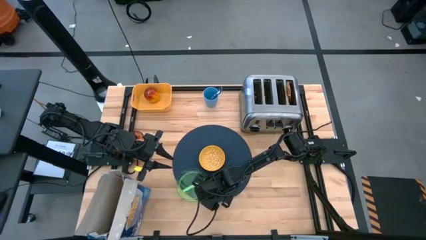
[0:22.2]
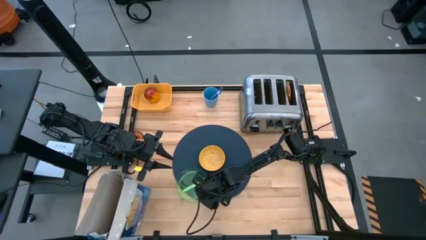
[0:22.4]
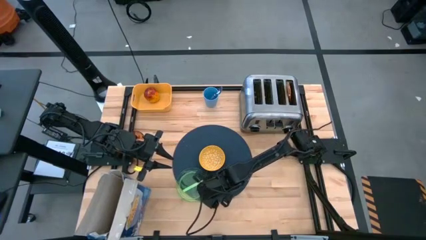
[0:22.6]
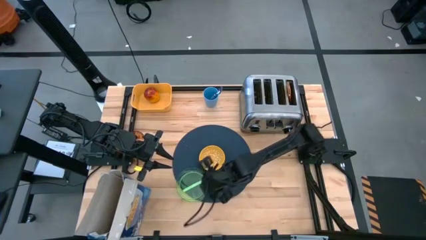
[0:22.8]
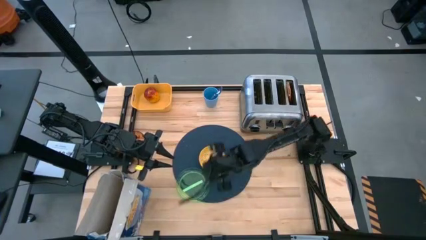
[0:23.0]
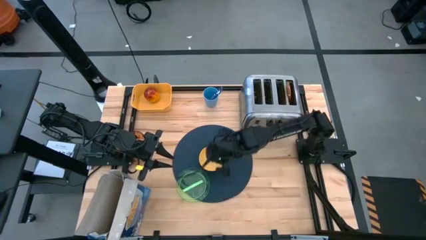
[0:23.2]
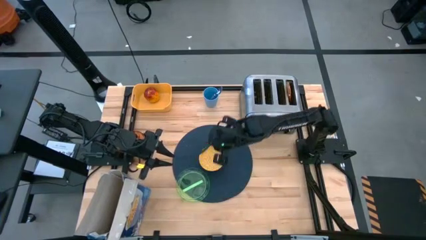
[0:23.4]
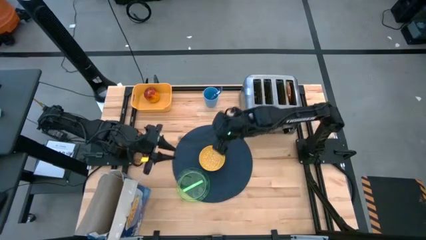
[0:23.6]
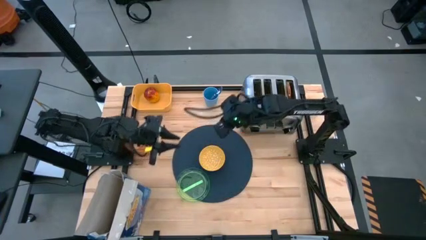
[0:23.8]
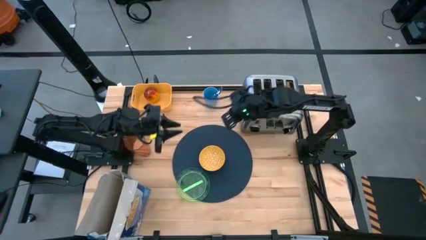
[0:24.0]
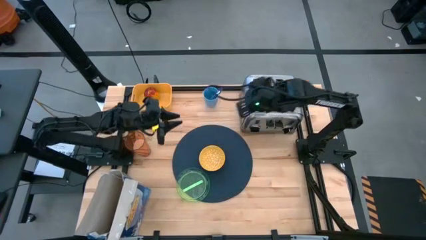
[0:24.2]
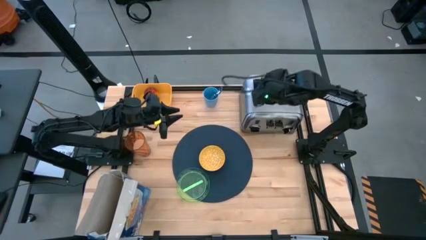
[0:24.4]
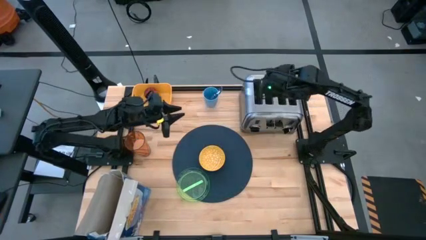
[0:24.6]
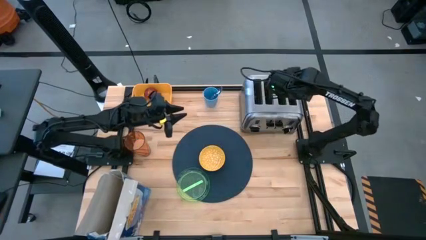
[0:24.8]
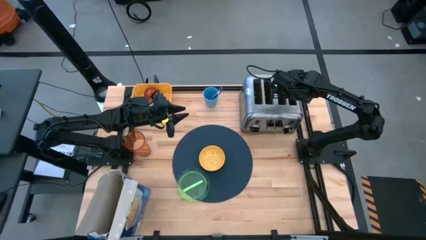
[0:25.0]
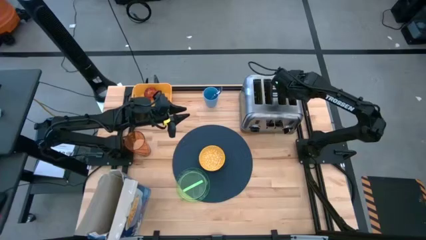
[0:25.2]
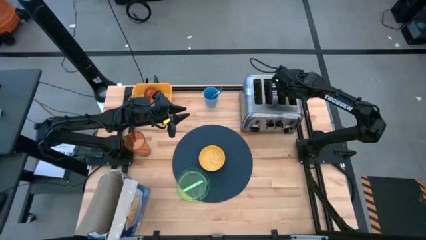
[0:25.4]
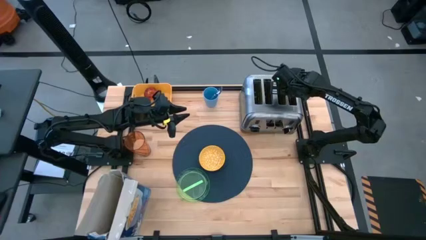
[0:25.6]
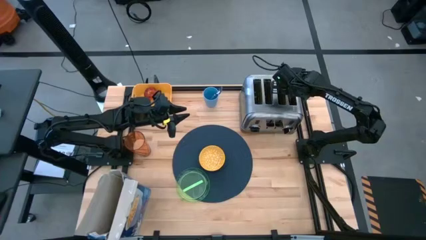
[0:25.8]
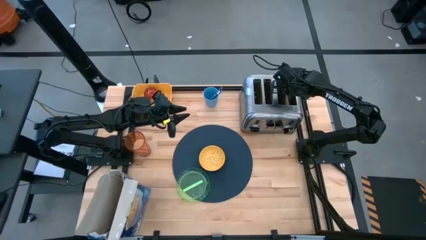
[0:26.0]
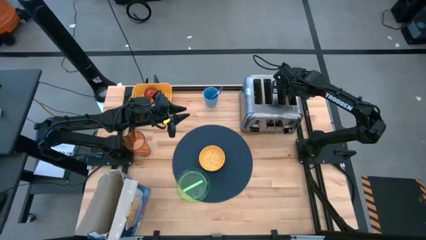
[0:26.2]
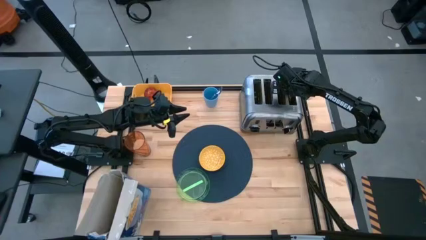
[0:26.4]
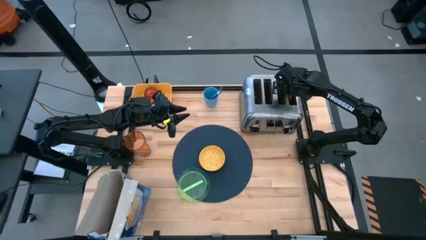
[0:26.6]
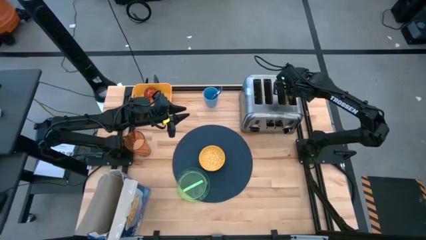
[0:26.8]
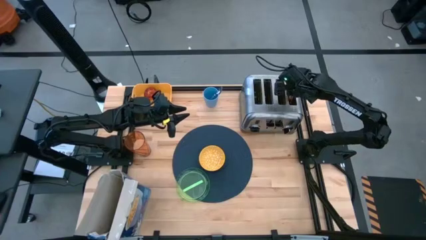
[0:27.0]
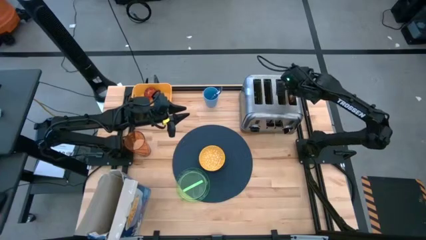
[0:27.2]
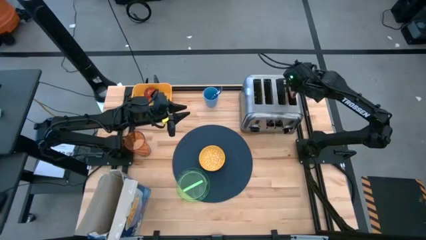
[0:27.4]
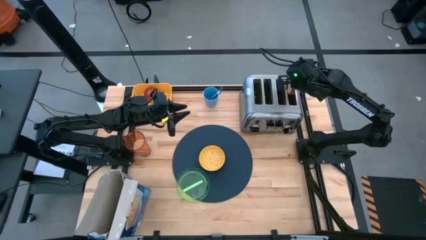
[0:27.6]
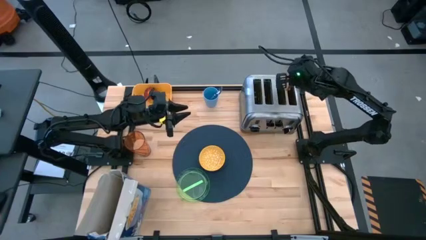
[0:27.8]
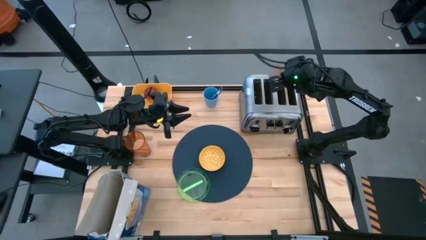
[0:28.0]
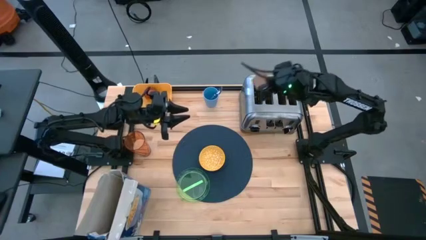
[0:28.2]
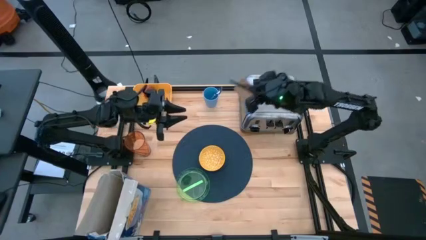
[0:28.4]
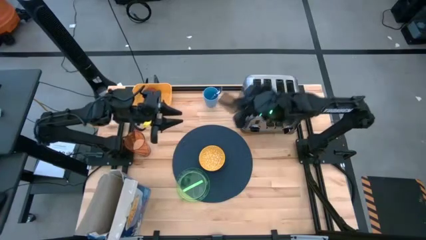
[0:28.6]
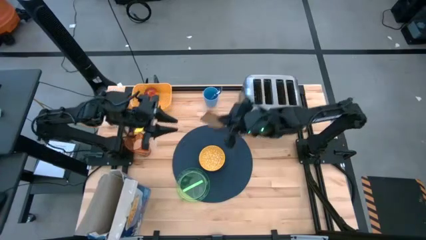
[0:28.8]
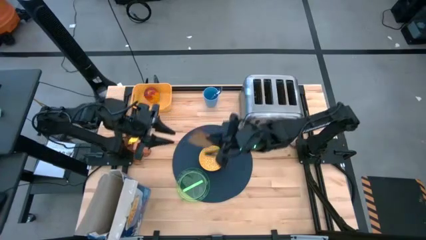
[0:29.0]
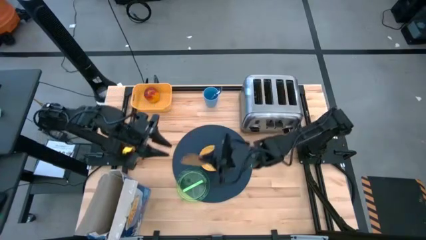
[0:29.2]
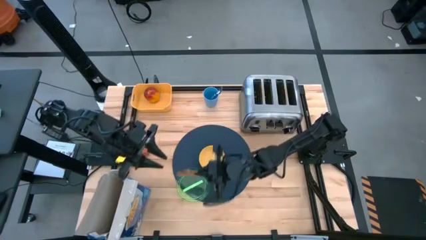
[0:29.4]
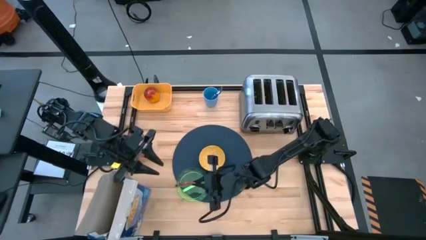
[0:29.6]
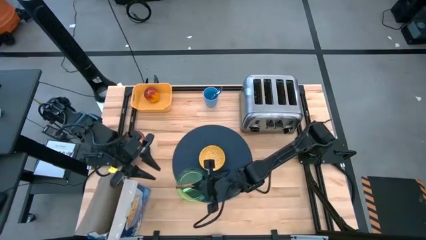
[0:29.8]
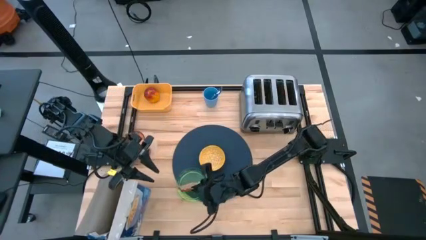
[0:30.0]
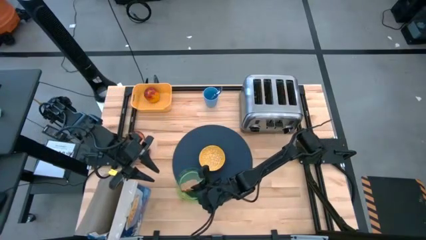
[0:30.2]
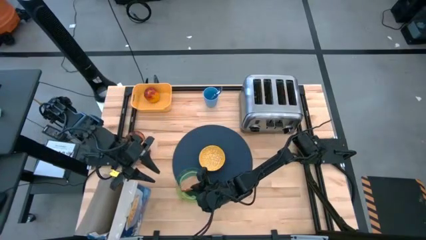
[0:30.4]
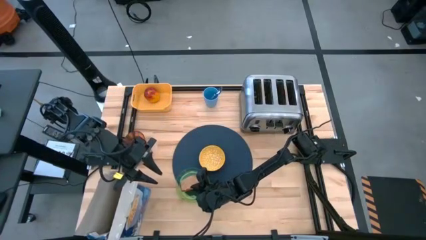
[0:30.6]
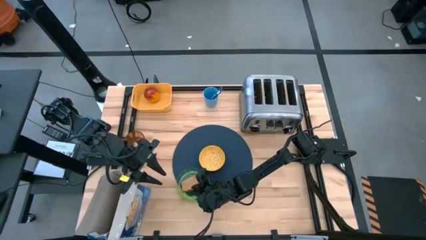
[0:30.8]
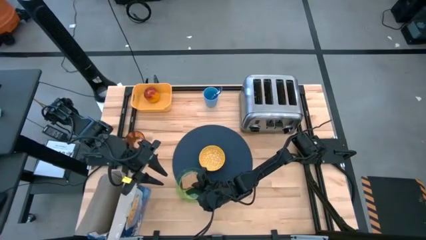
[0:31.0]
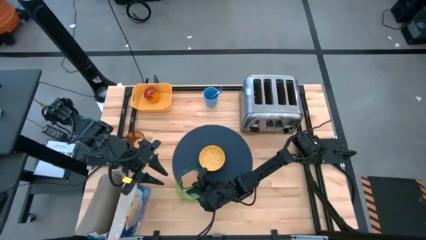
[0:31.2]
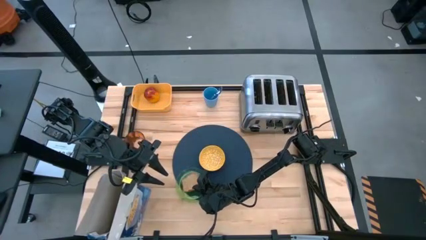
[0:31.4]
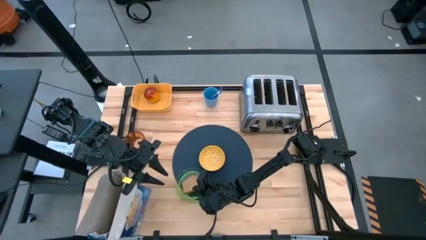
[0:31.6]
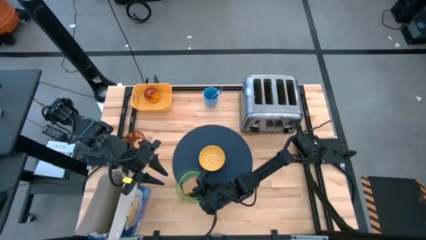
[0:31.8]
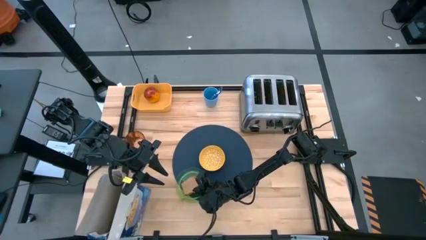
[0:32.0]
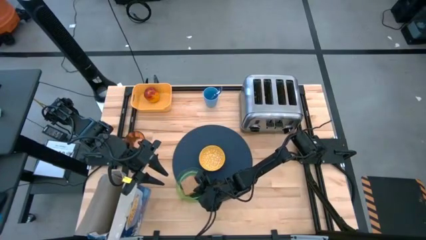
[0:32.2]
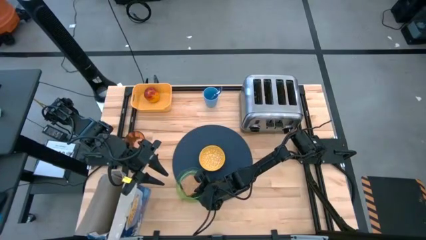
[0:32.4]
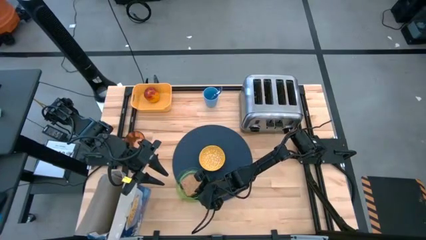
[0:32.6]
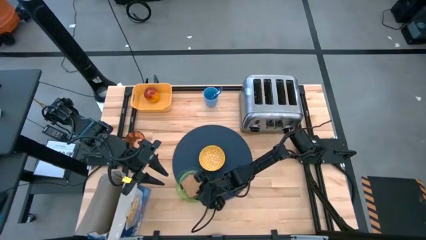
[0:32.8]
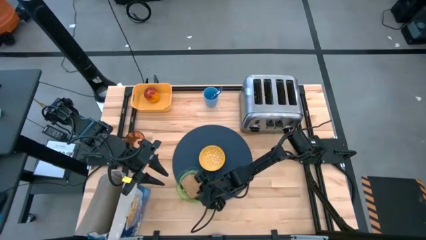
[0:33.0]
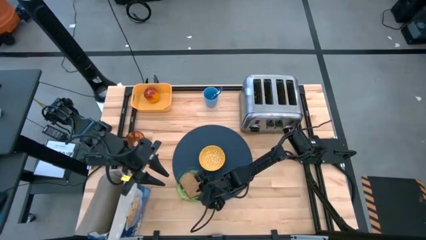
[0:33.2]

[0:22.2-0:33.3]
Task: Arrange a breakfast setting
Put the bread on the green plate on the dark blue table mat
